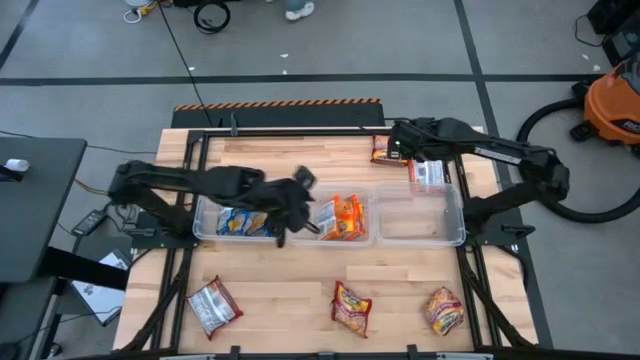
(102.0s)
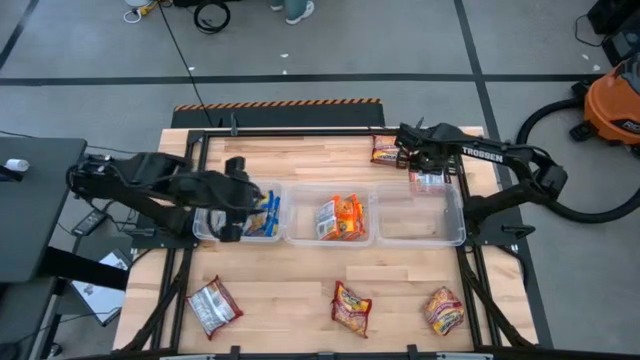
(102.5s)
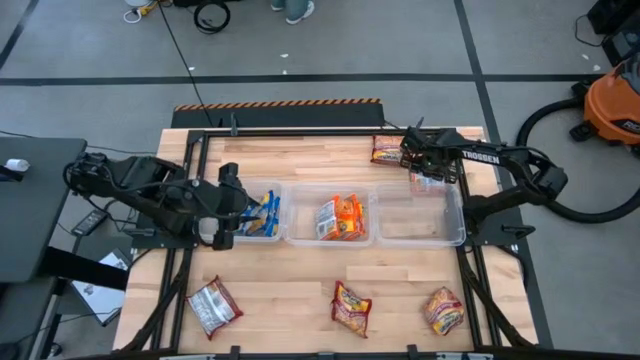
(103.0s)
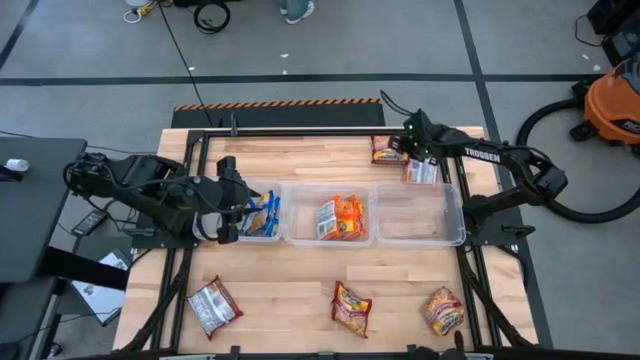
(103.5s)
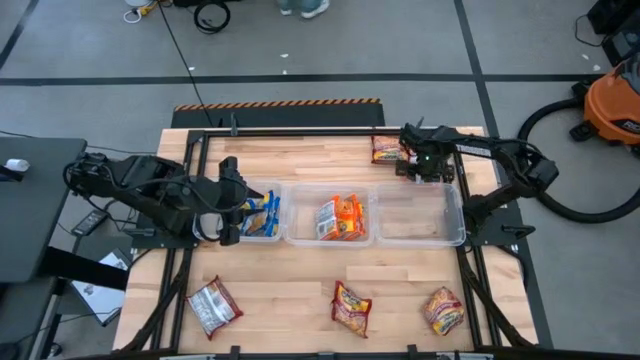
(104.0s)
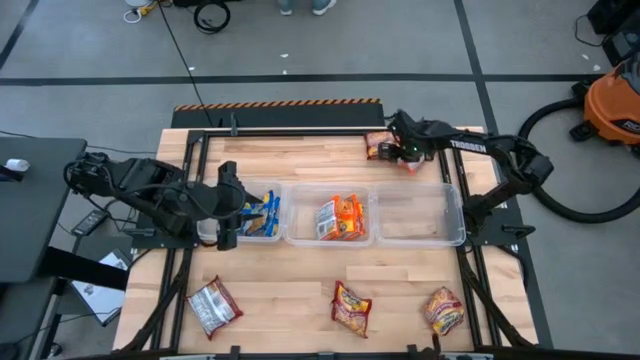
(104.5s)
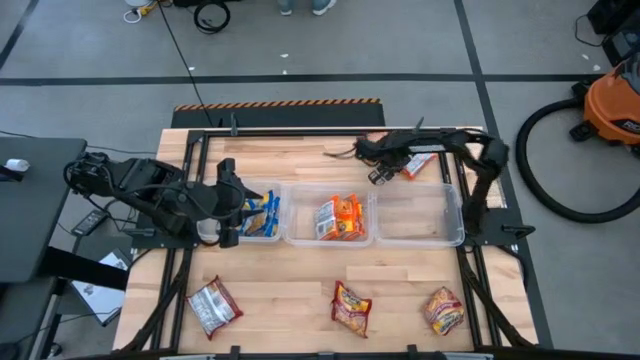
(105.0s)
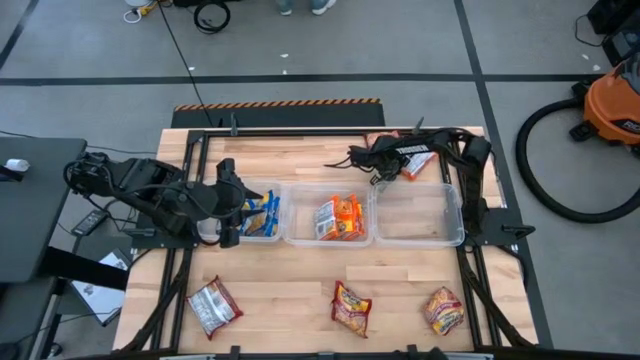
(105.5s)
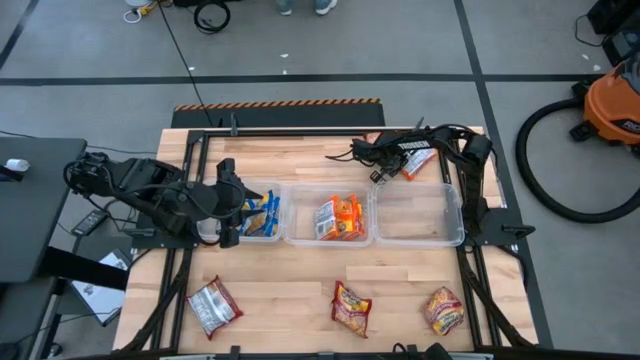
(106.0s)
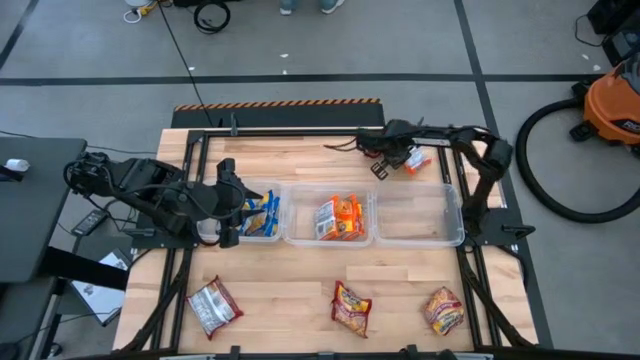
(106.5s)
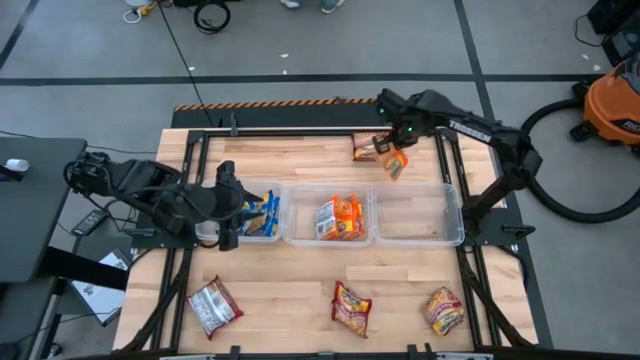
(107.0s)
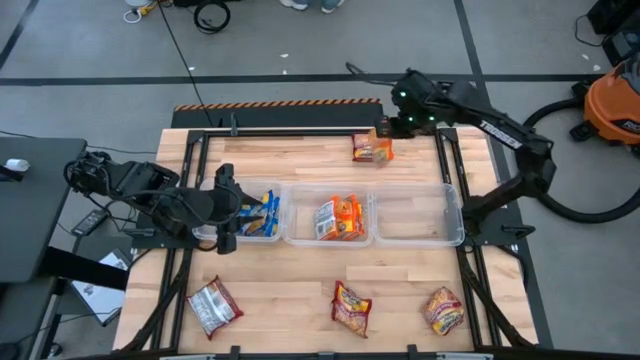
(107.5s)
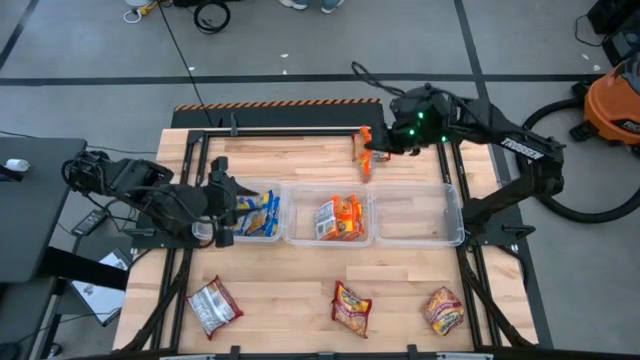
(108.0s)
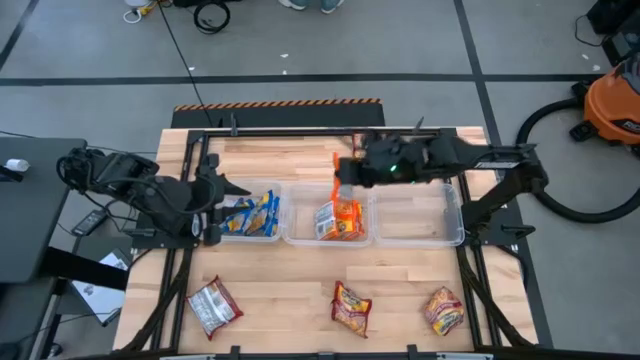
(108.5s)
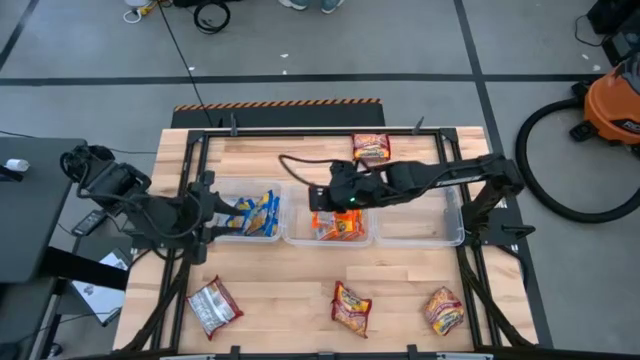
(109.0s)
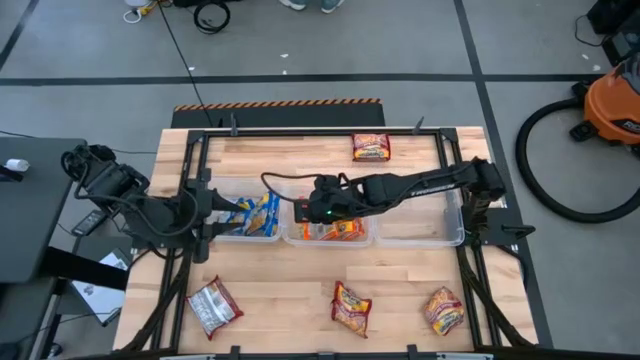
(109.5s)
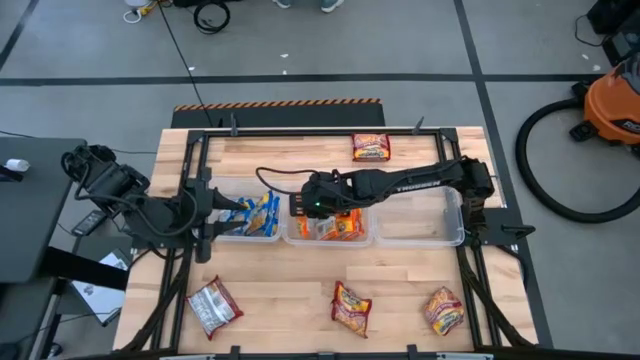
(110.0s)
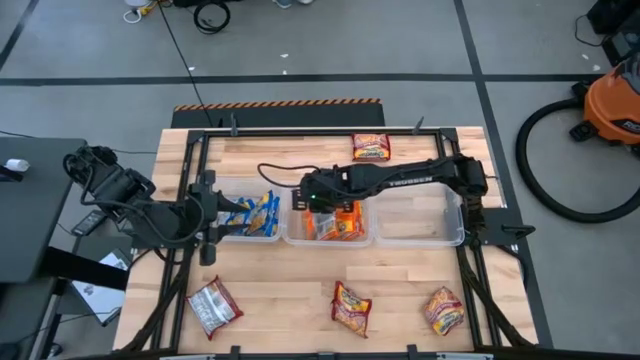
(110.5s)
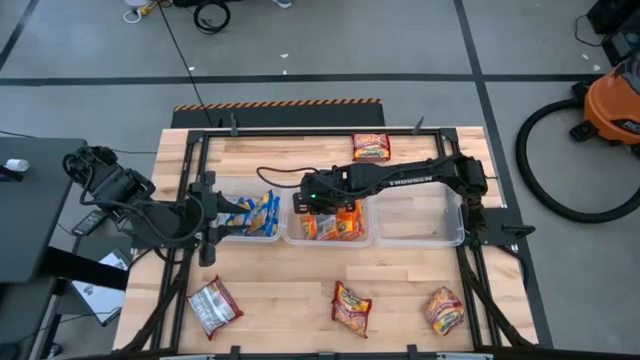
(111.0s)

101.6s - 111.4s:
Task: Sort Maruchan noodles
Put the orange noodle pack into the middle transparent bin

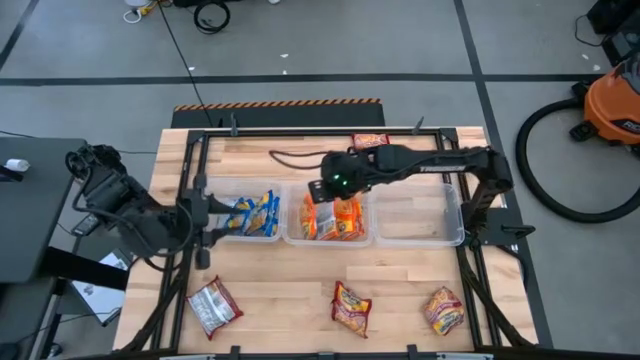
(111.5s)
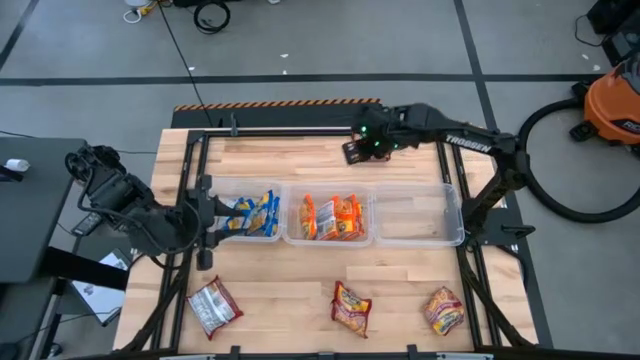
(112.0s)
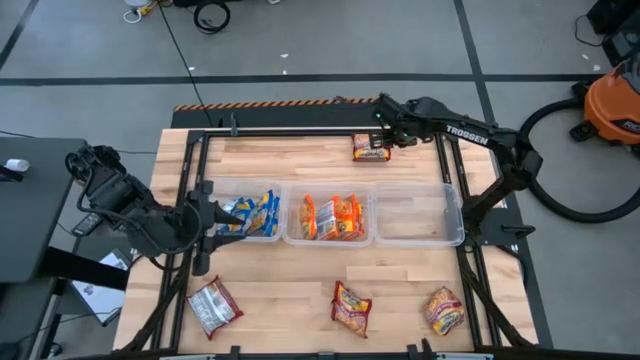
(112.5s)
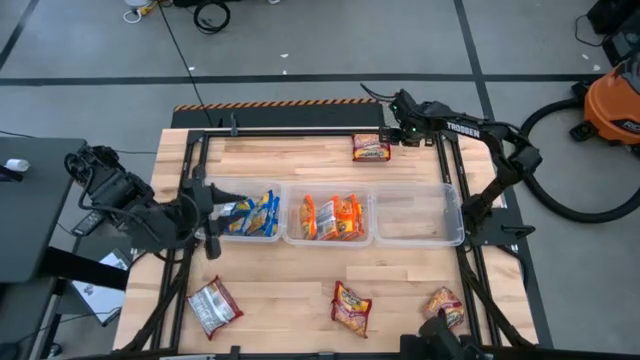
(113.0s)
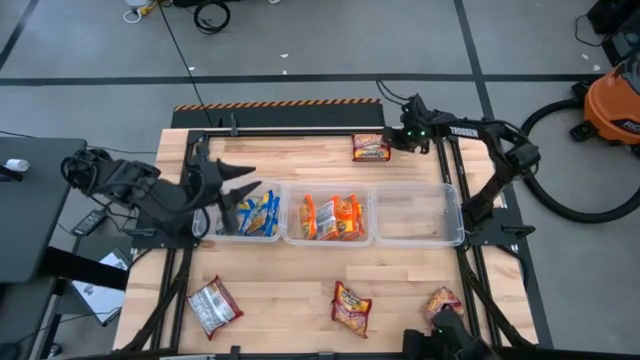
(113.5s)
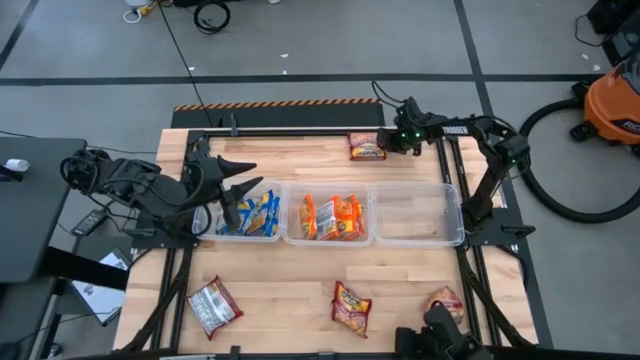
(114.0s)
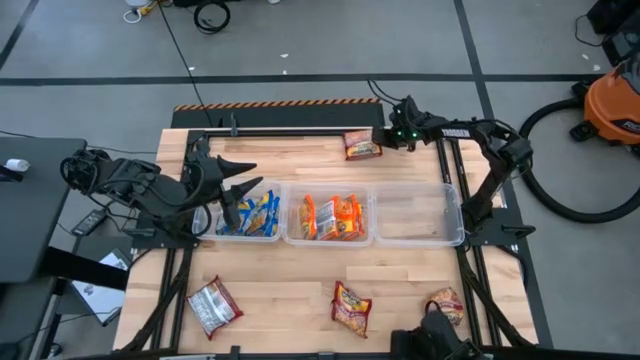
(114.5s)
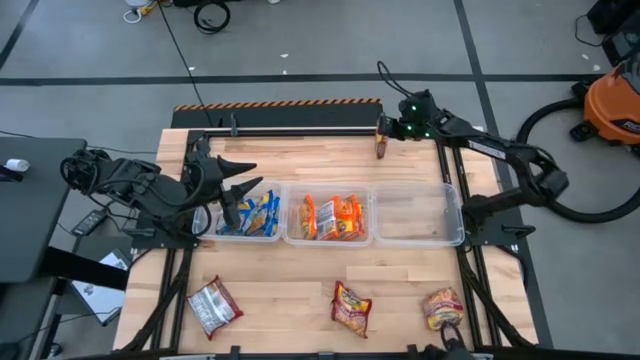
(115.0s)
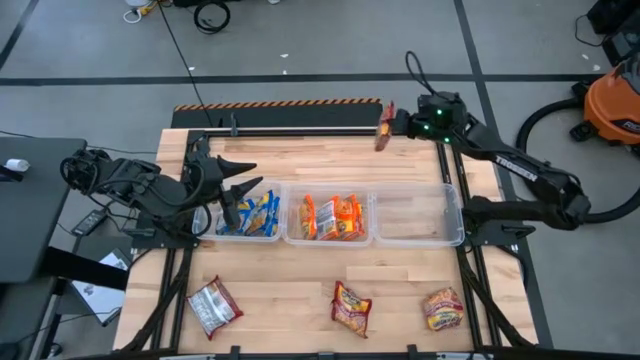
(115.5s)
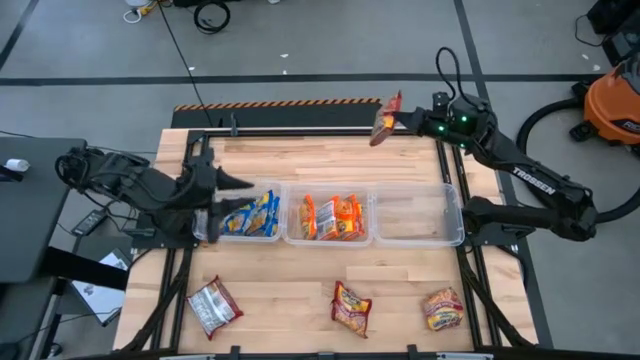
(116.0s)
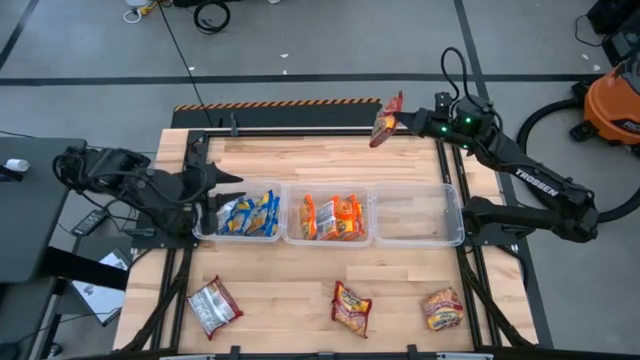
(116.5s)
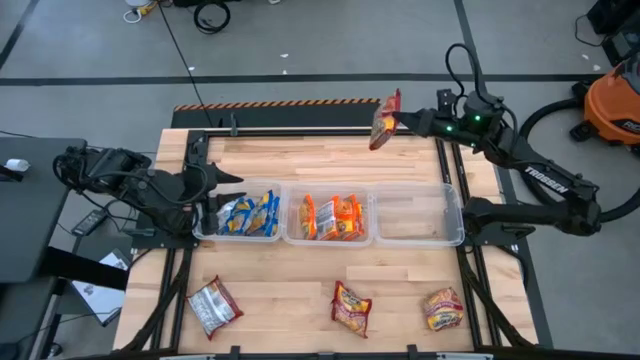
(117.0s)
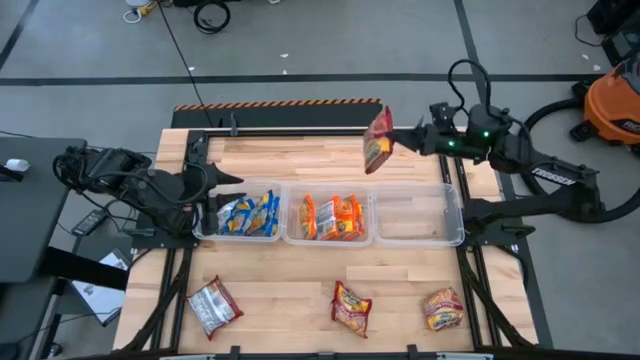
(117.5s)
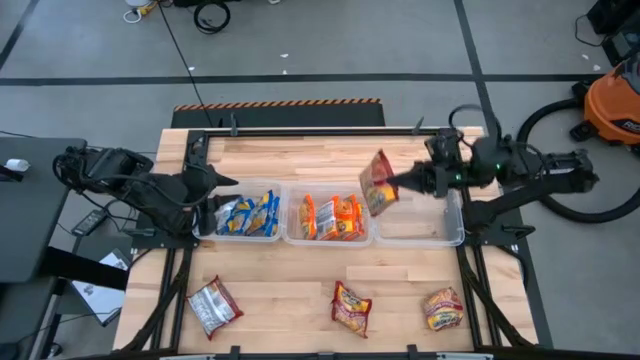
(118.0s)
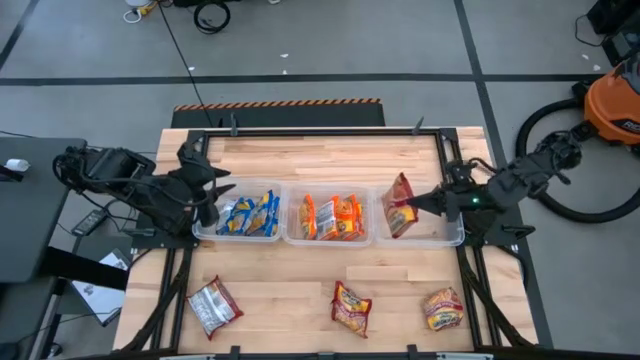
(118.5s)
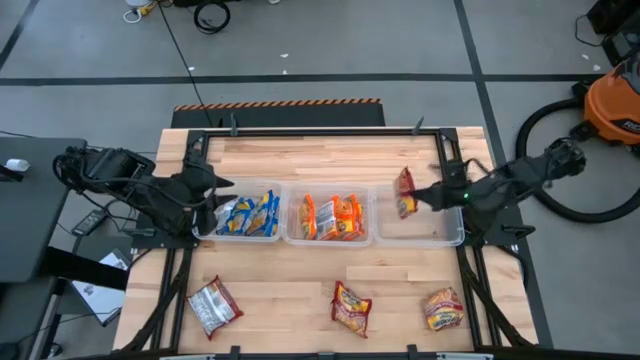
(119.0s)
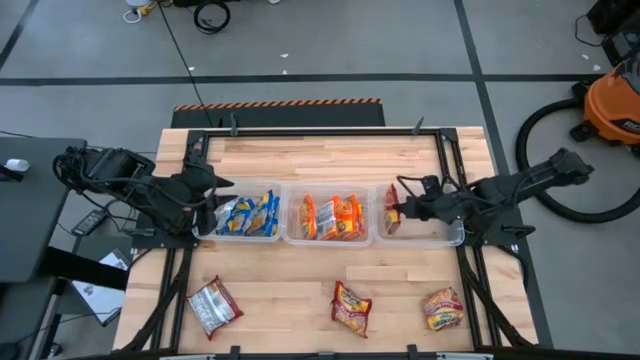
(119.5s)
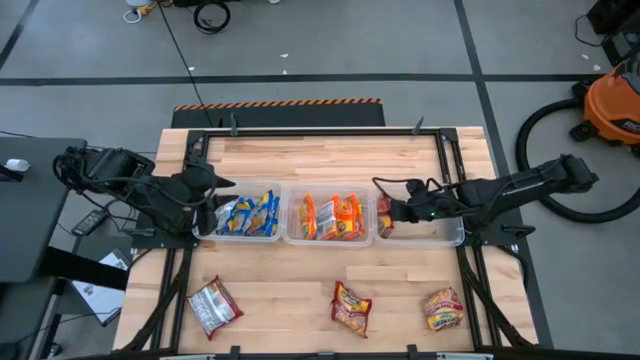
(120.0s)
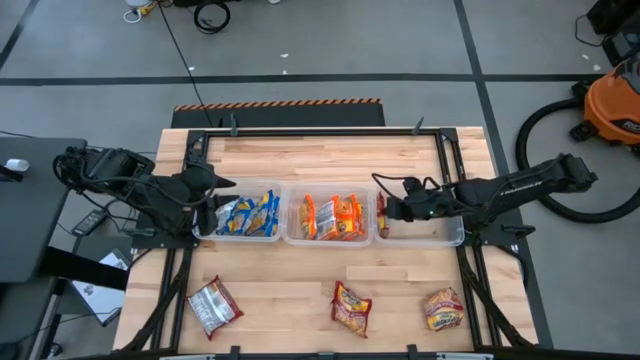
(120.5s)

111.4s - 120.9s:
Put the red noodle pack into the right transparent bin

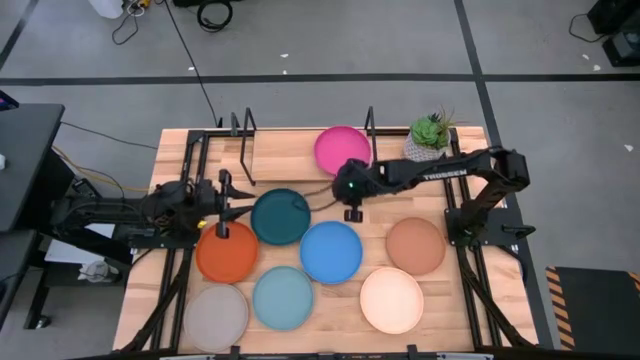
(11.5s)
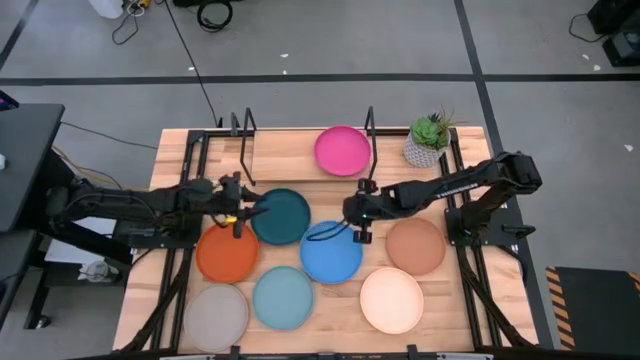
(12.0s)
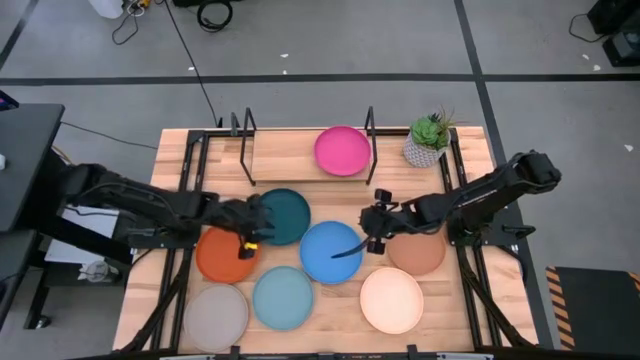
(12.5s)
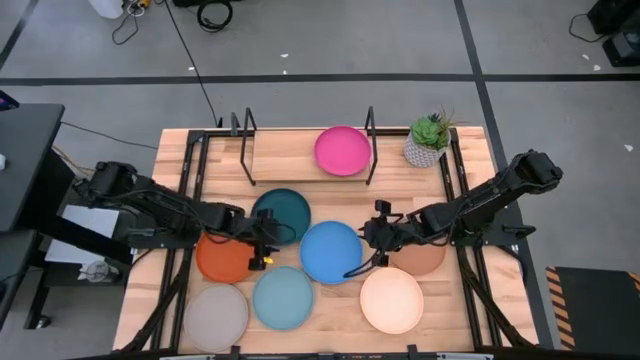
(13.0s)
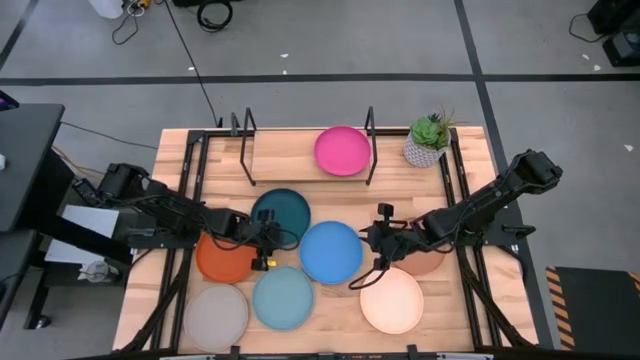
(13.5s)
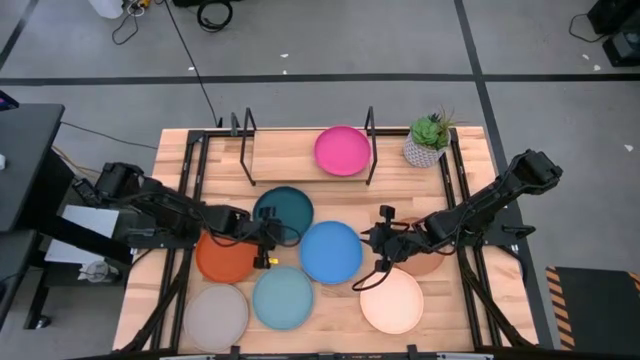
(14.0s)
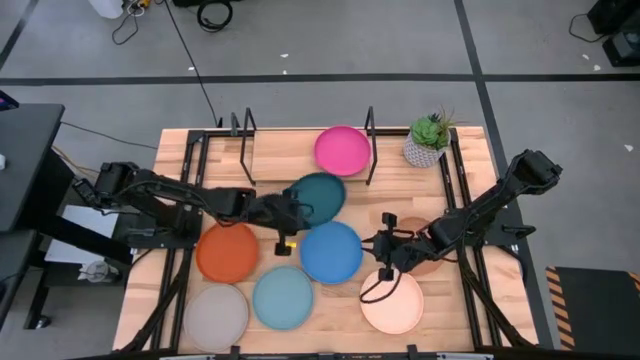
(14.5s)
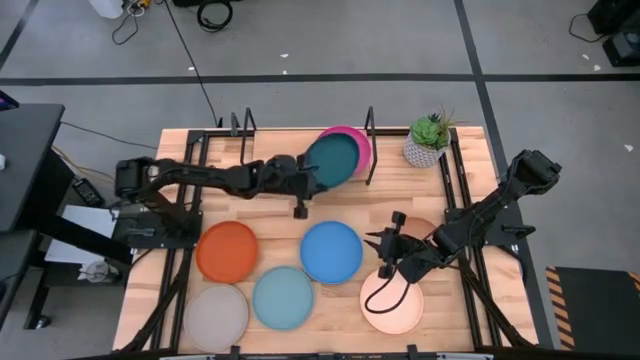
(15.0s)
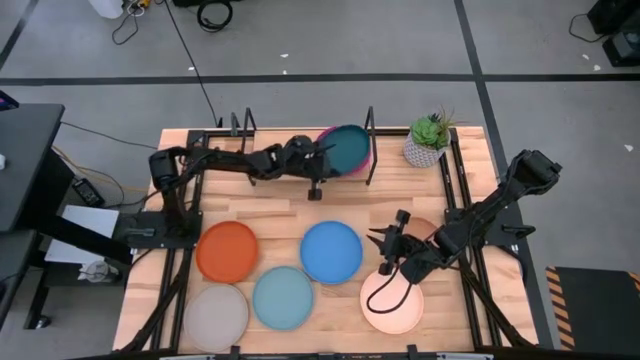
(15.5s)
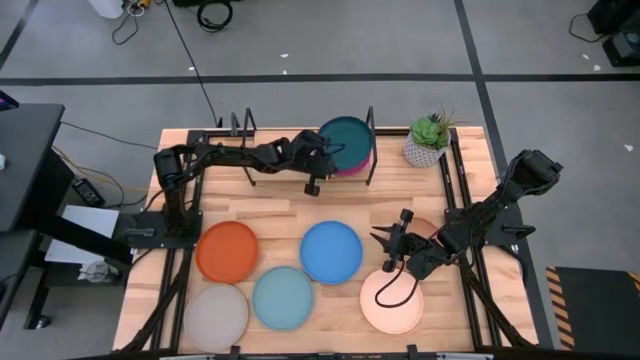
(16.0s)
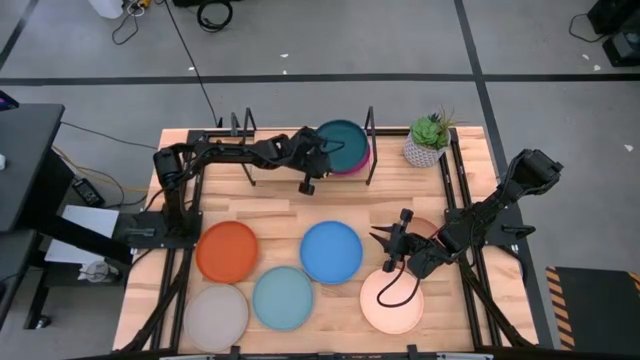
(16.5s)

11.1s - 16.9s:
Task: Place and stack plates onto a shelf
Stack the dark green plate on top of the pink plate on the shelf
